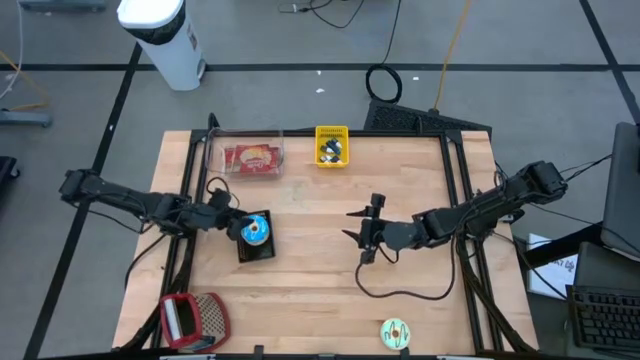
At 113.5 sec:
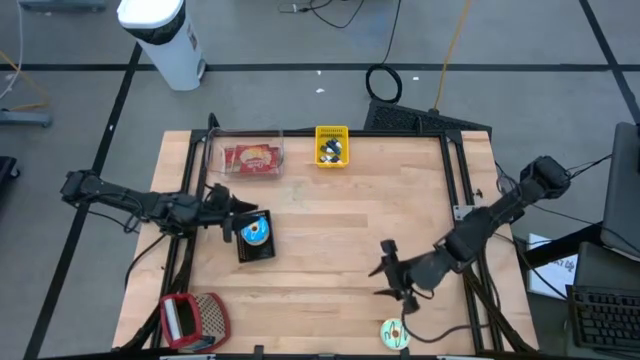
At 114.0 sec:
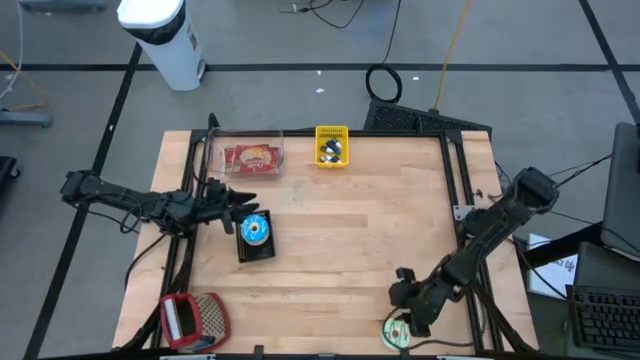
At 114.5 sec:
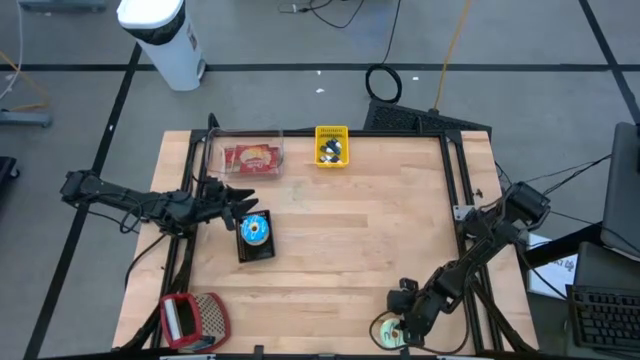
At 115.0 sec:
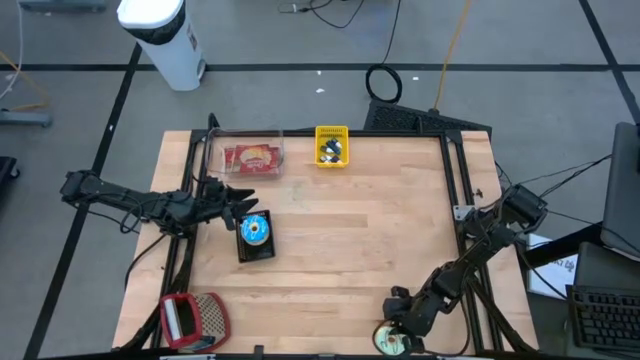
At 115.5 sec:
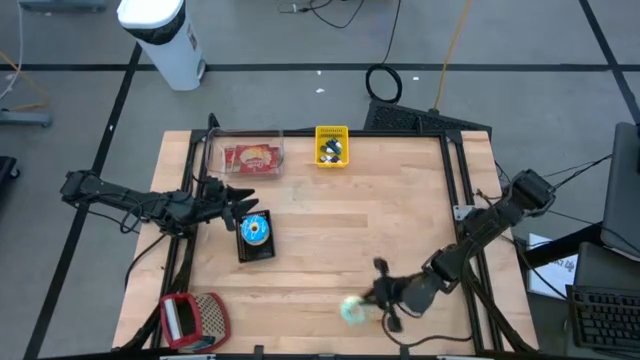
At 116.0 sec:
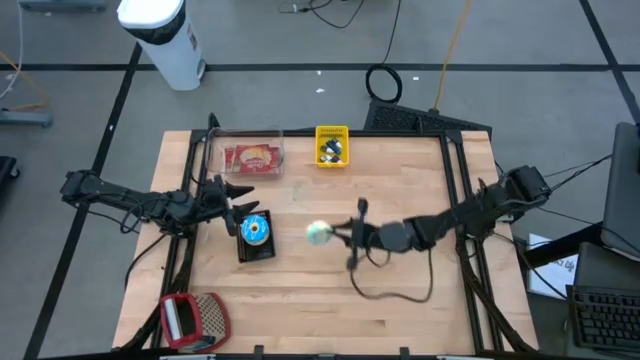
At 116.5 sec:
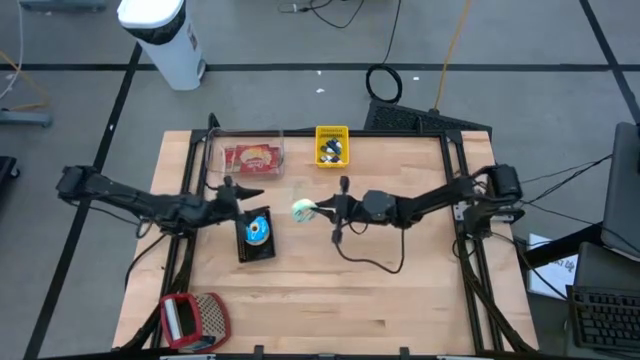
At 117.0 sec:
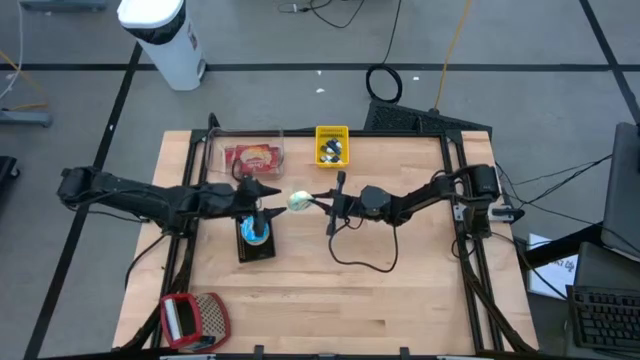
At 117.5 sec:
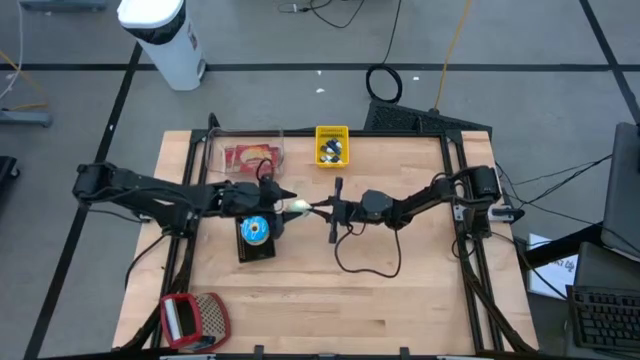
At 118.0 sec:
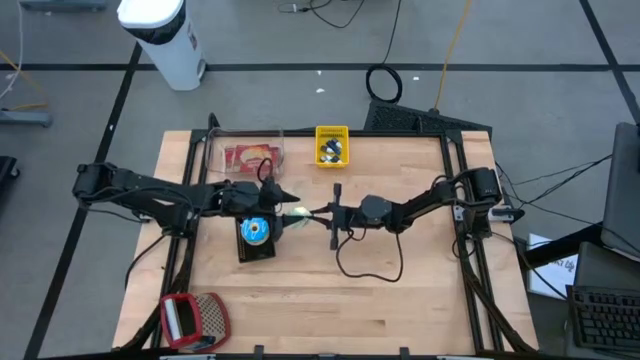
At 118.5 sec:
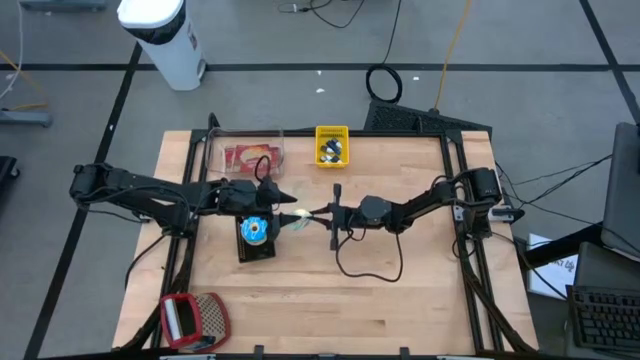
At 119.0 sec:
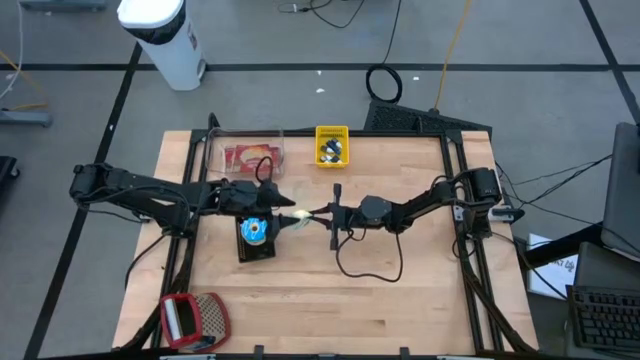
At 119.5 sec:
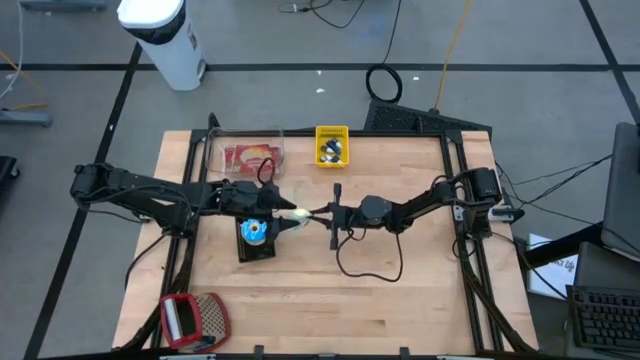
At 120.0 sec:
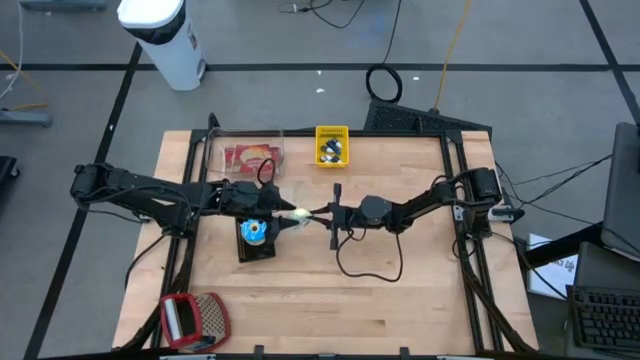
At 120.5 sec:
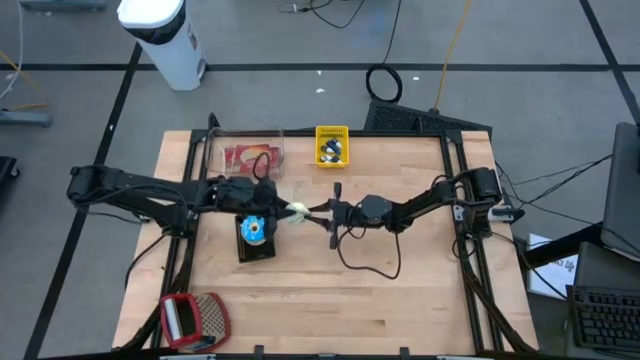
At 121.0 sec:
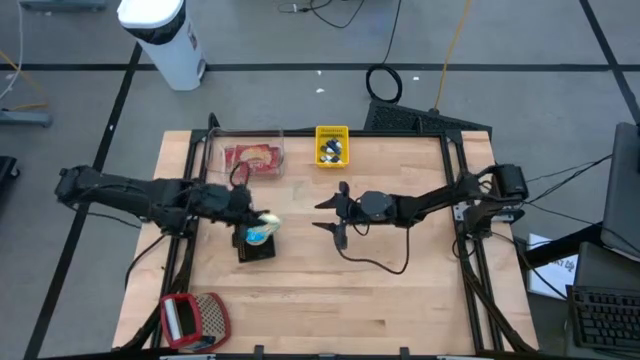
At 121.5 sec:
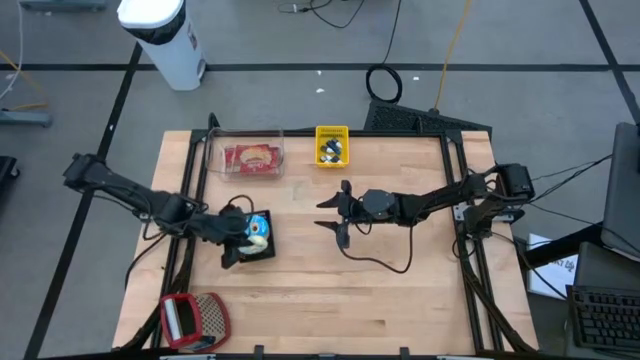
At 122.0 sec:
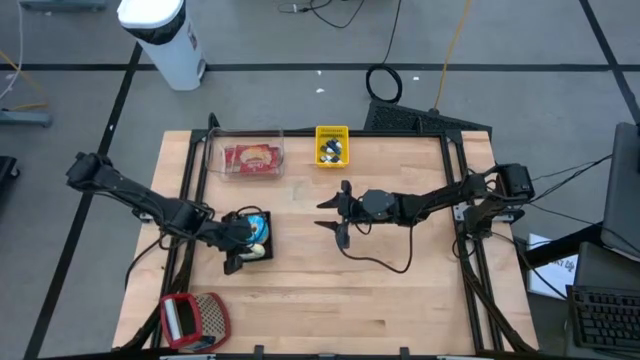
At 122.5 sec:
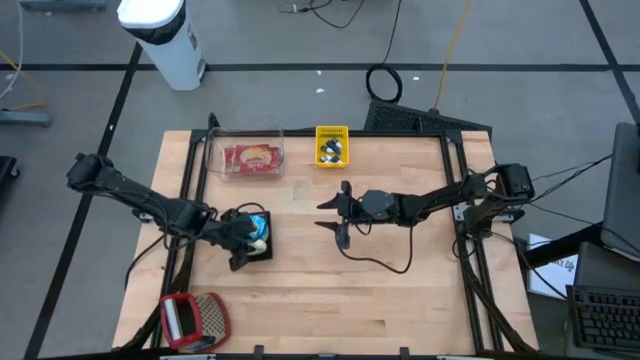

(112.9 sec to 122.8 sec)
Task: Pick & Place Food Item
Put the light blue donut into the black bin

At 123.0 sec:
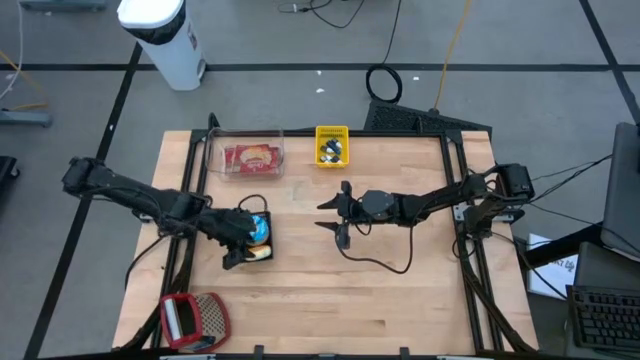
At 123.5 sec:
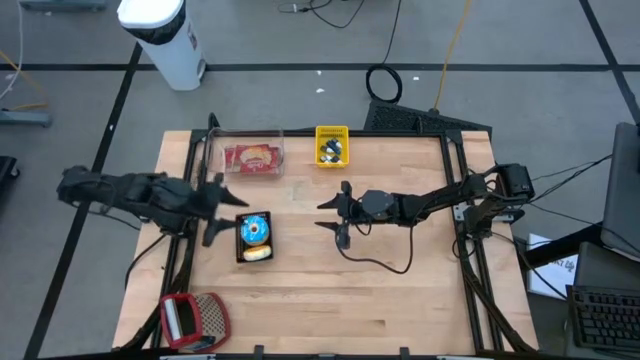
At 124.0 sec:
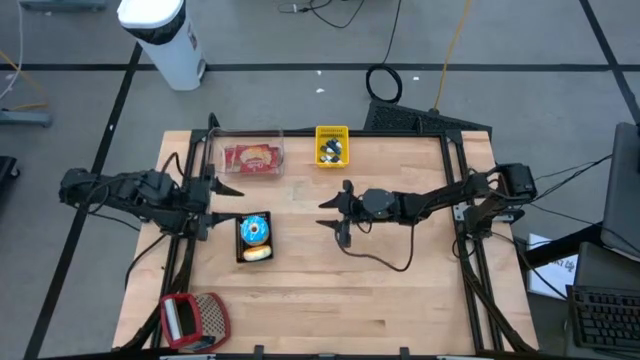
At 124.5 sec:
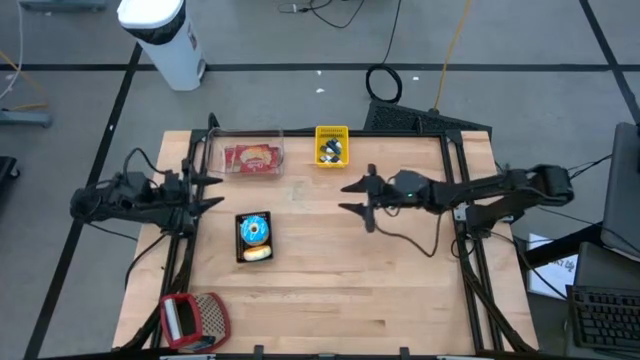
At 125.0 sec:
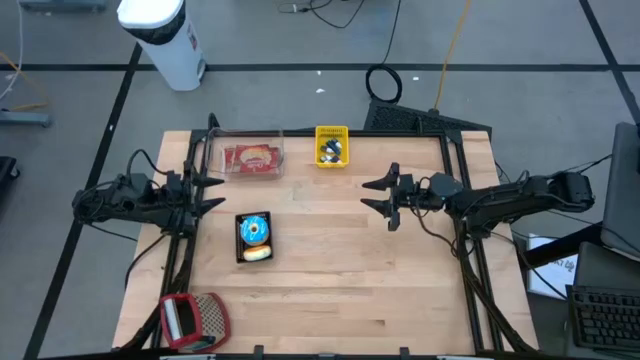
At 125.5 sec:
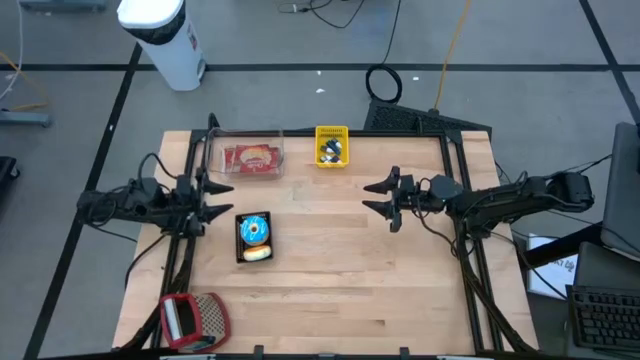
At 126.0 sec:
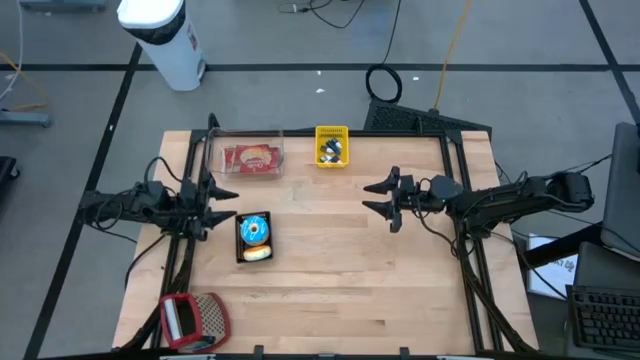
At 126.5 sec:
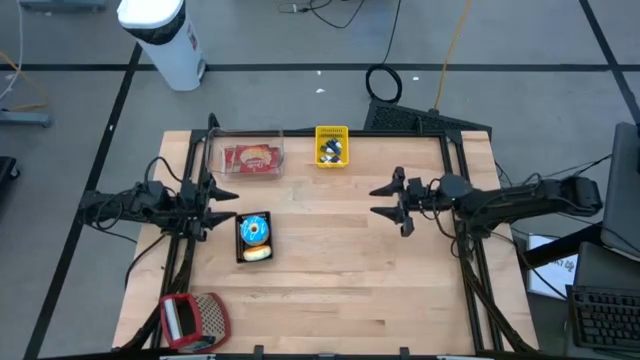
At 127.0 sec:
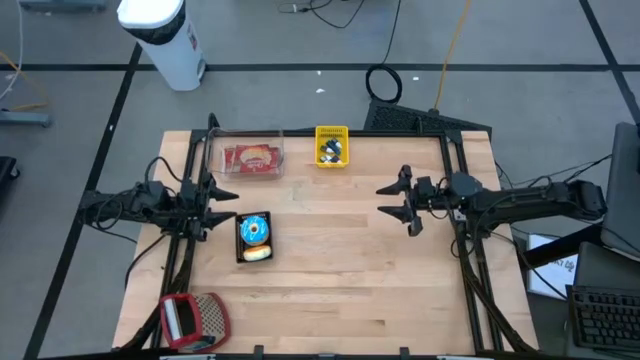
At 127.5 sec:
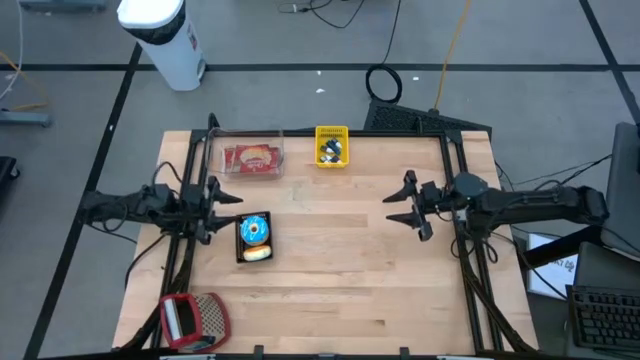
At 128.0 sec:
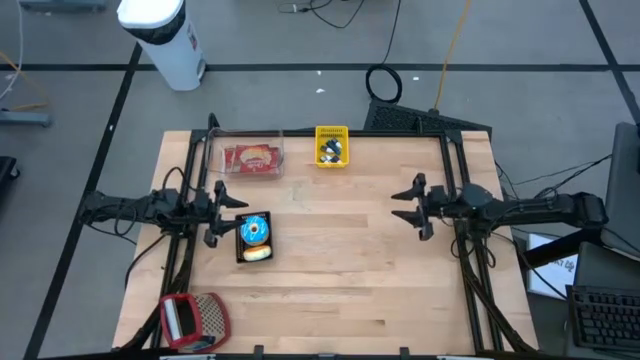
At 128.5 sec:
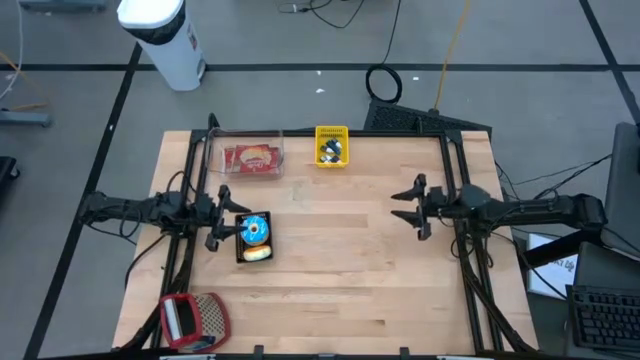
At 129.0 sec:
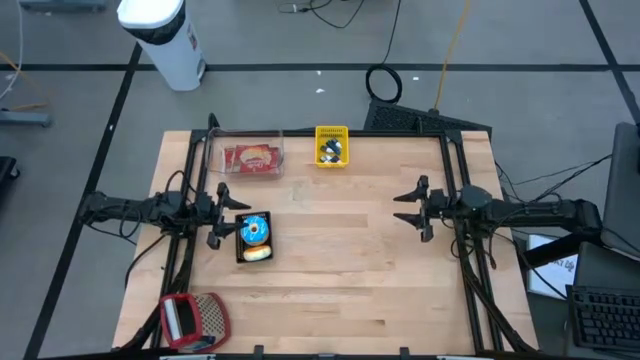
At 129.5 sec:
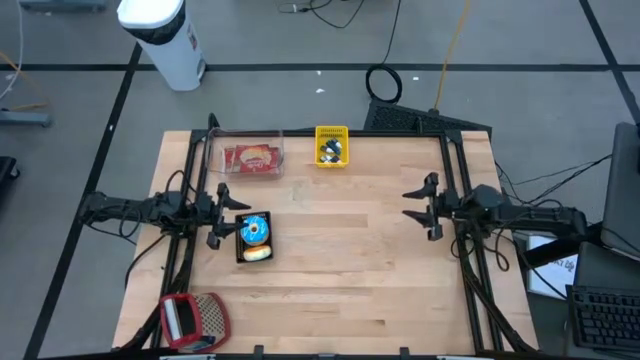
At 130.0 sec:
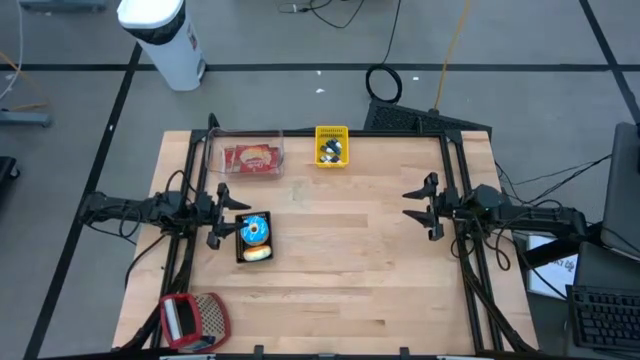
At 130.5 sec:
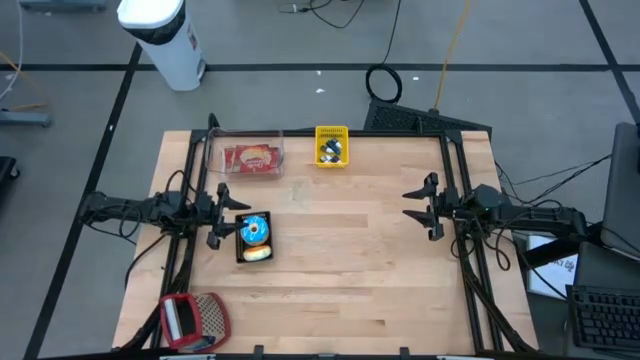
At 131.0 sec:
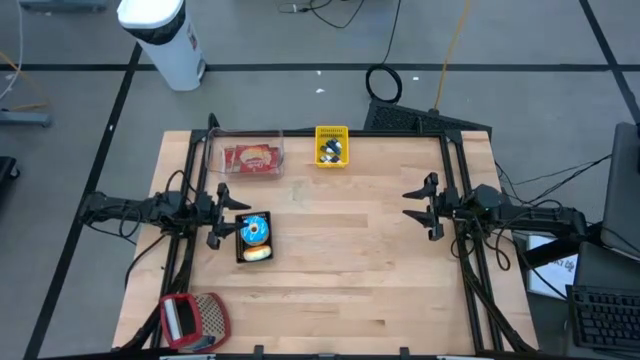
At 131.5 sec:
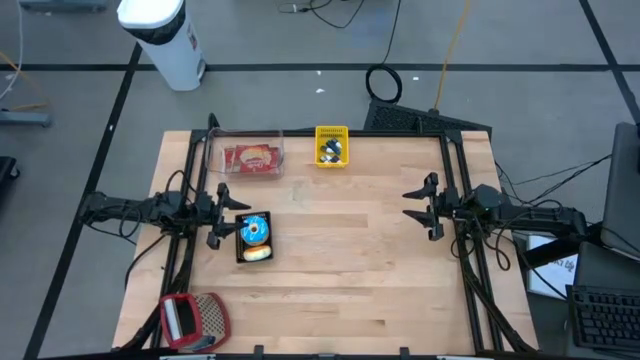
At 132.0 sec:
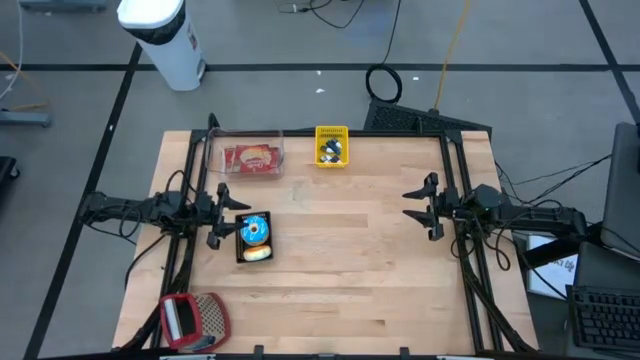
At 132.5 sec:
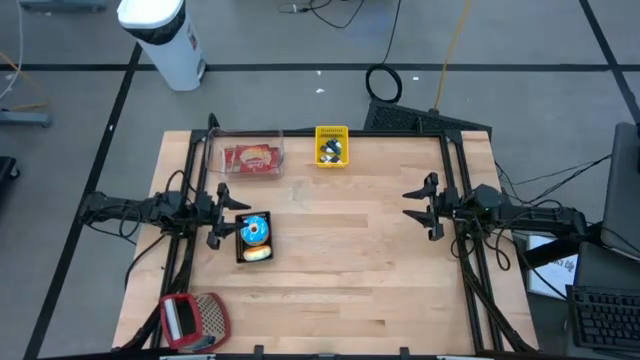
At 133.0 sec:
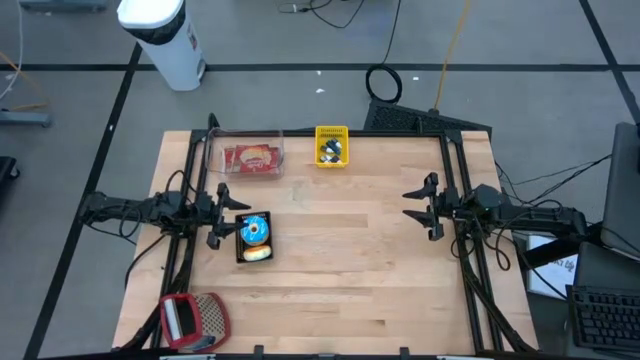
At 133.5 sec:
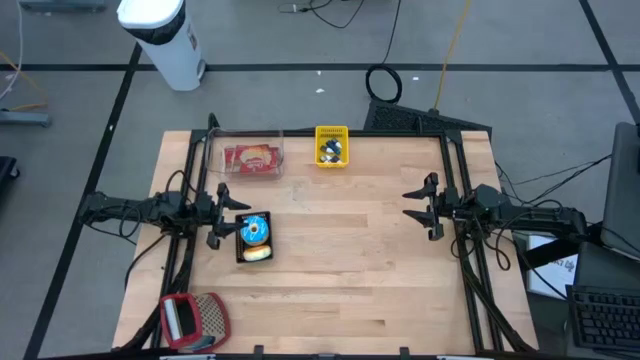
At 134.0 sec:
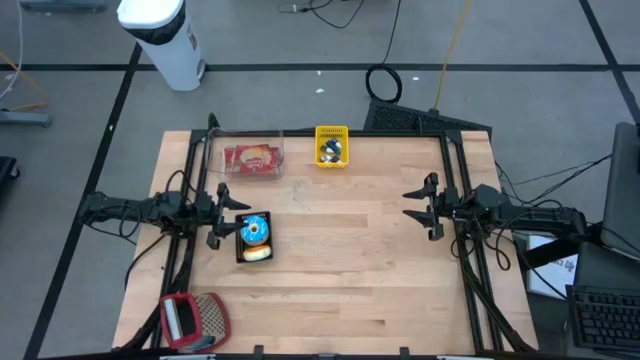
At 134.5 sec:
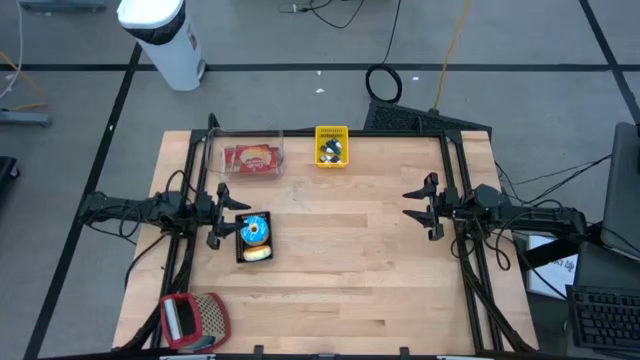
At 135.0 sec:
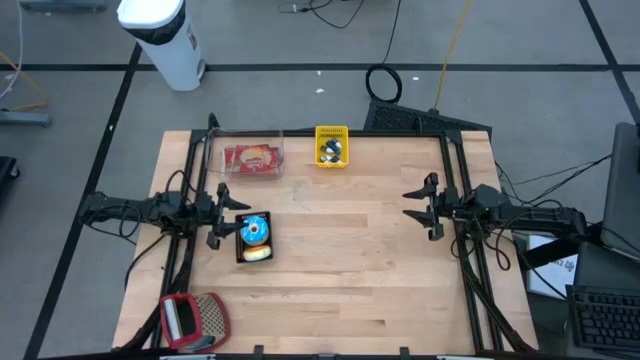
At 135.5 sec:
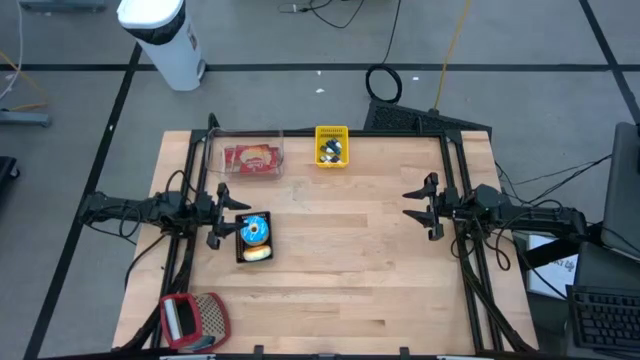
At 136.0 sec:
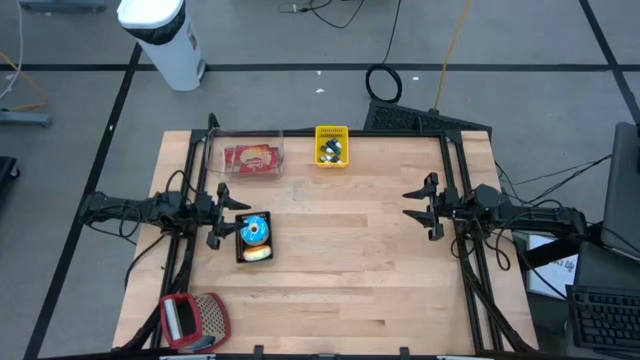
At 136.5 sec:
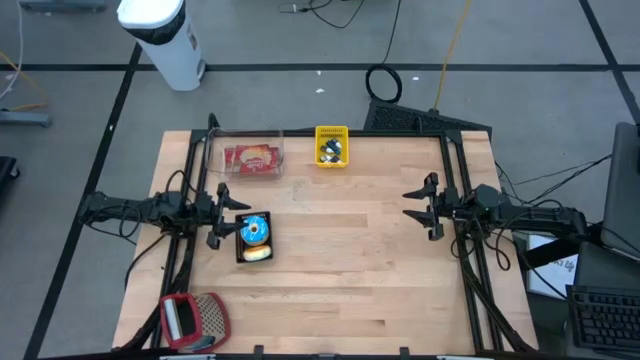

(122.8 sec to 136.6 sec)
Return to Home Position
